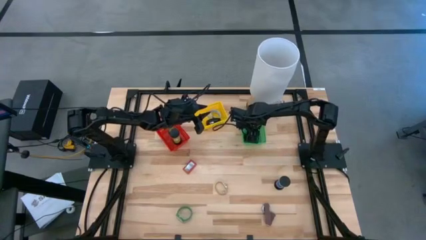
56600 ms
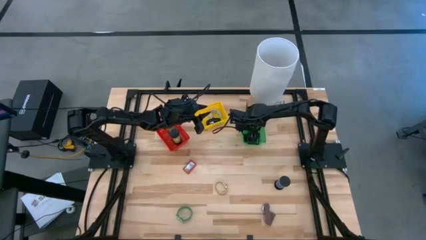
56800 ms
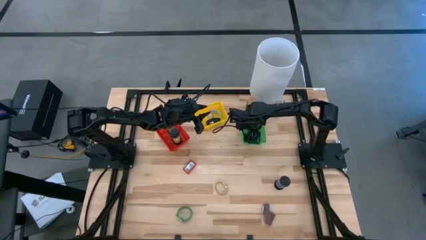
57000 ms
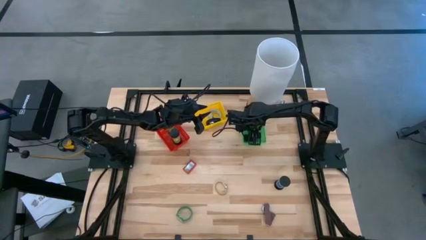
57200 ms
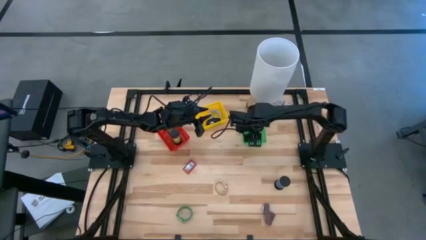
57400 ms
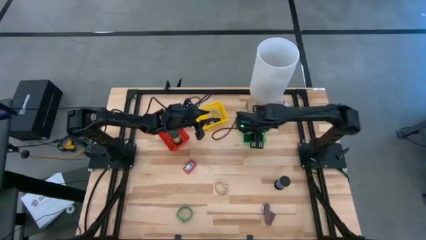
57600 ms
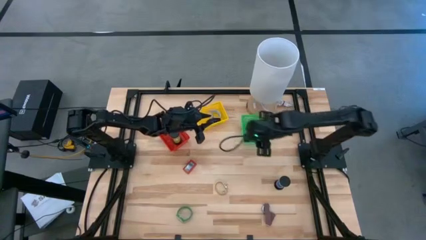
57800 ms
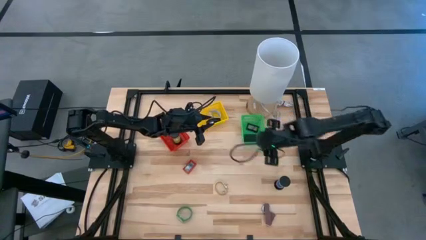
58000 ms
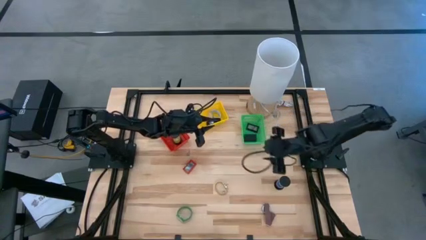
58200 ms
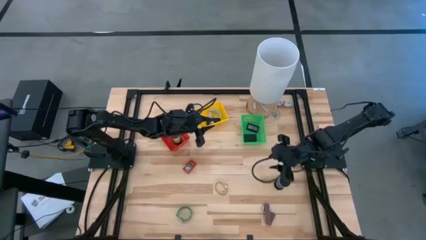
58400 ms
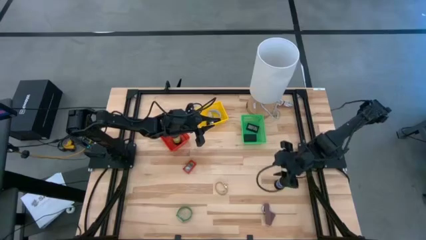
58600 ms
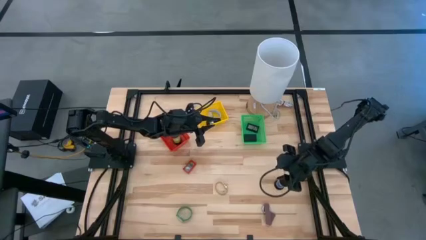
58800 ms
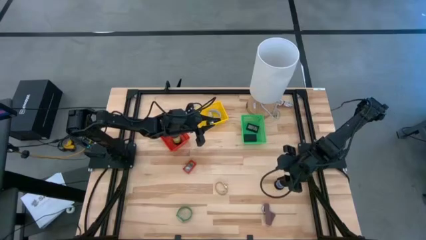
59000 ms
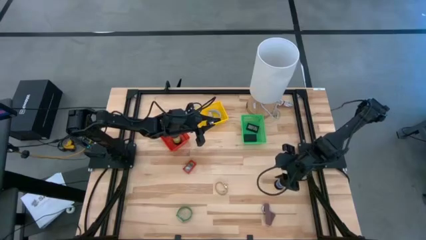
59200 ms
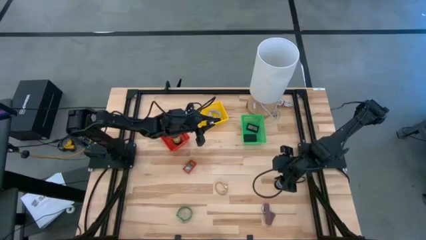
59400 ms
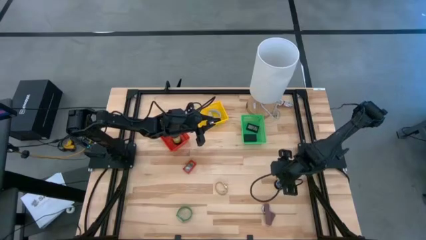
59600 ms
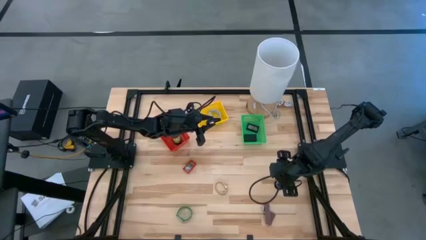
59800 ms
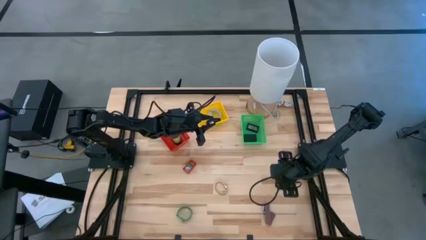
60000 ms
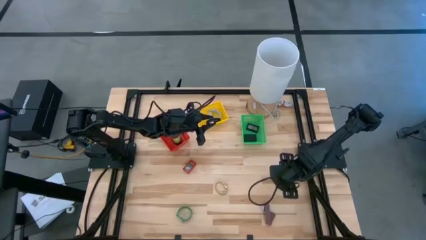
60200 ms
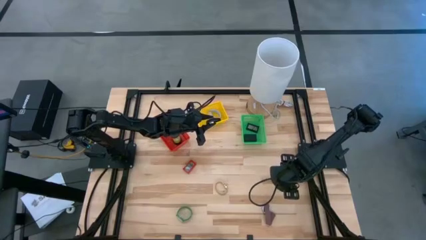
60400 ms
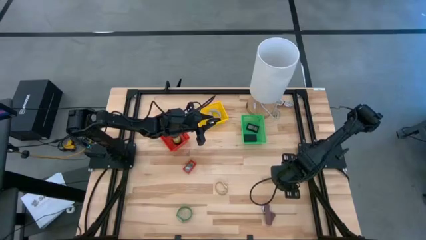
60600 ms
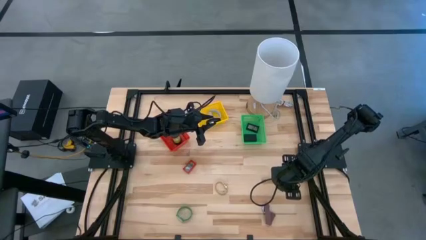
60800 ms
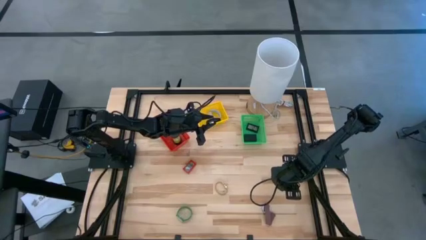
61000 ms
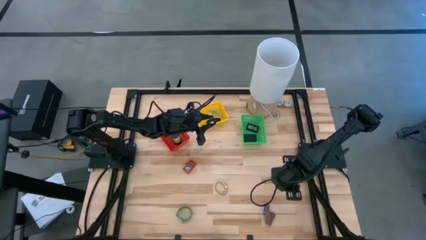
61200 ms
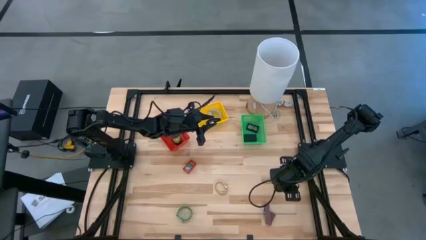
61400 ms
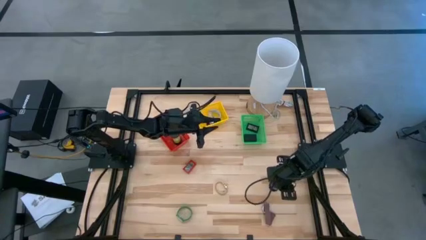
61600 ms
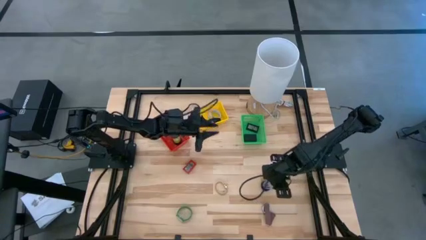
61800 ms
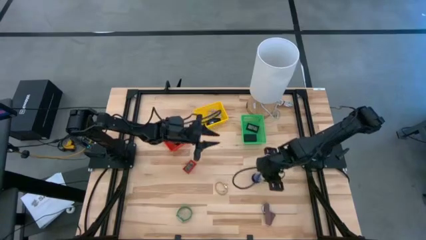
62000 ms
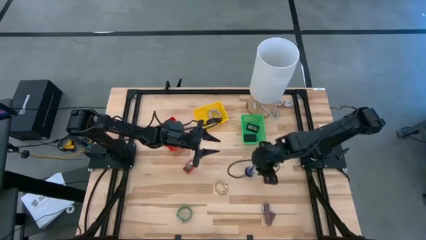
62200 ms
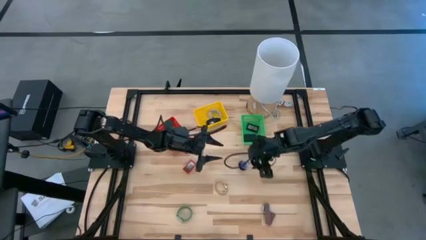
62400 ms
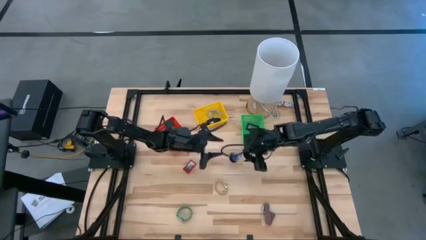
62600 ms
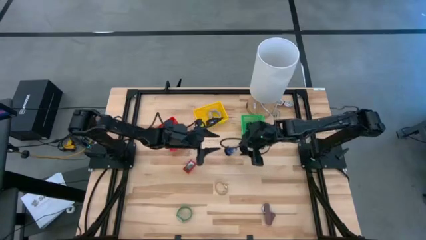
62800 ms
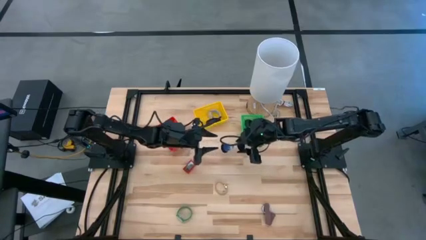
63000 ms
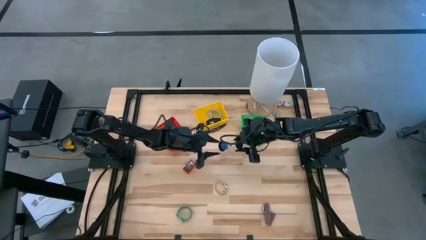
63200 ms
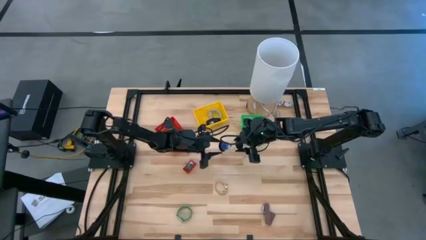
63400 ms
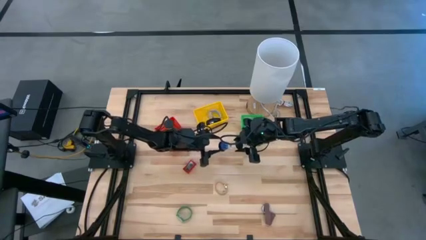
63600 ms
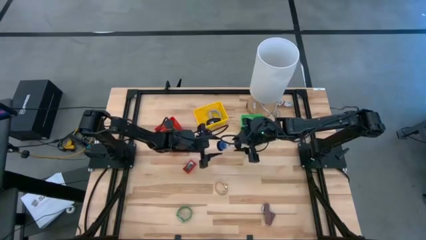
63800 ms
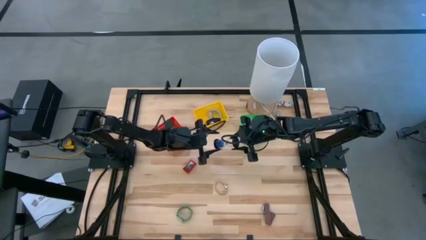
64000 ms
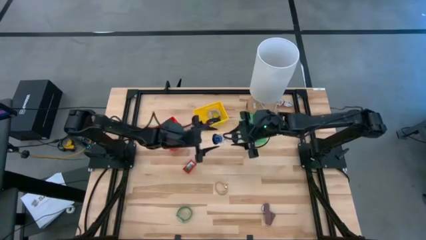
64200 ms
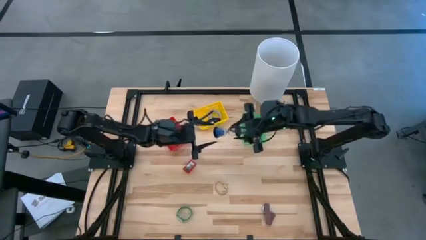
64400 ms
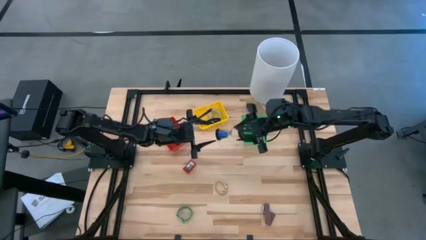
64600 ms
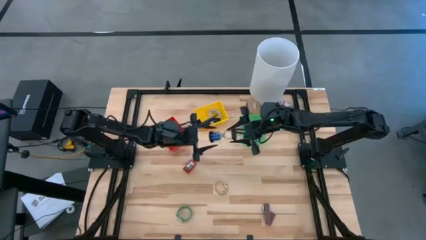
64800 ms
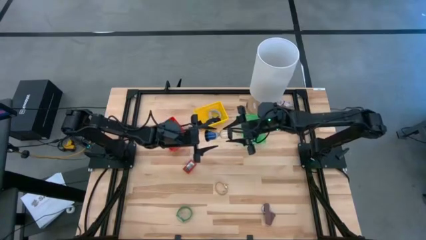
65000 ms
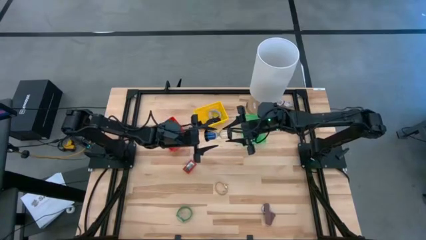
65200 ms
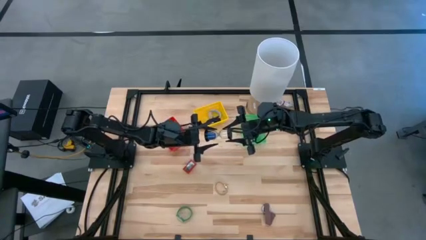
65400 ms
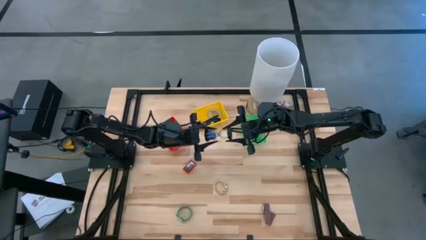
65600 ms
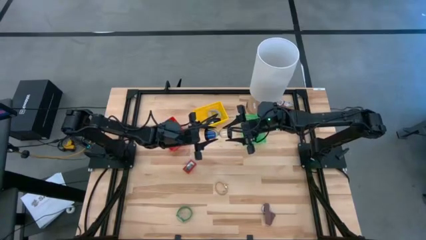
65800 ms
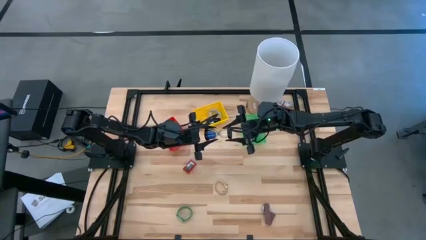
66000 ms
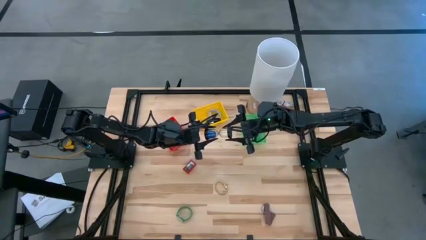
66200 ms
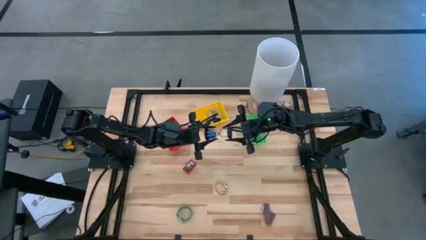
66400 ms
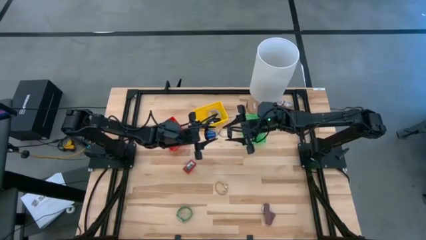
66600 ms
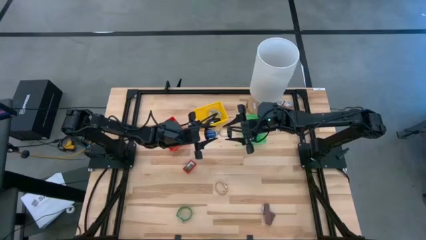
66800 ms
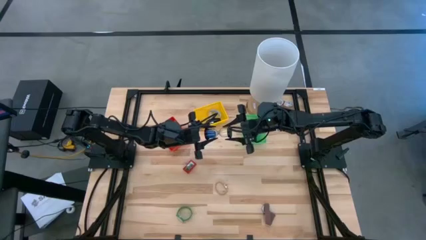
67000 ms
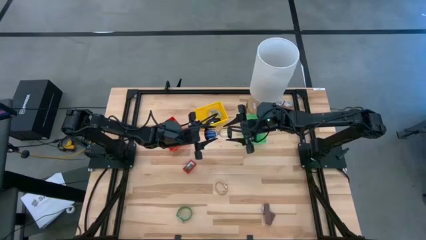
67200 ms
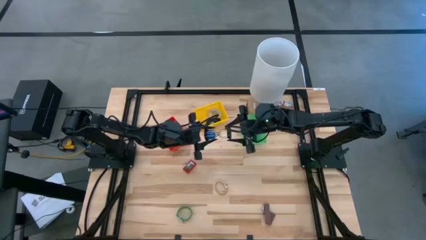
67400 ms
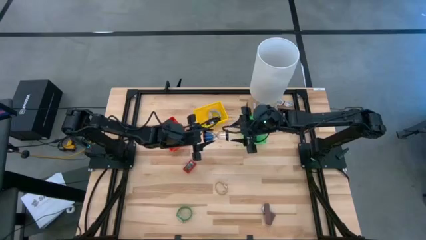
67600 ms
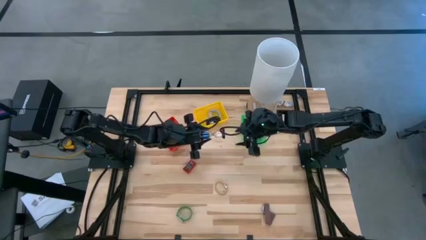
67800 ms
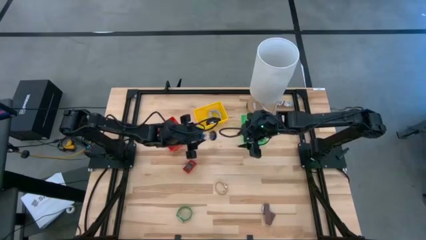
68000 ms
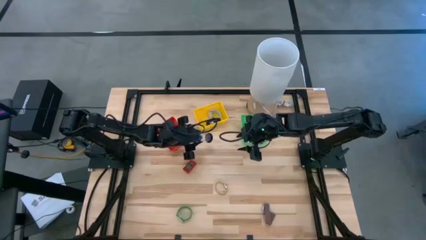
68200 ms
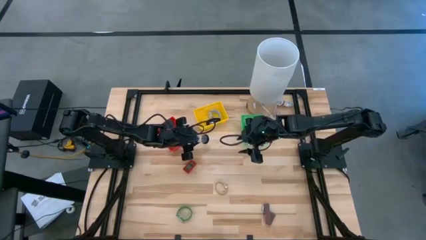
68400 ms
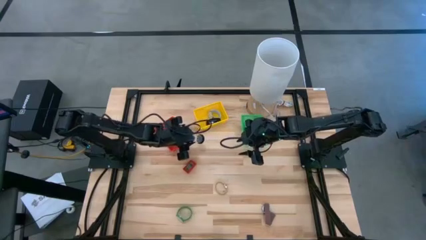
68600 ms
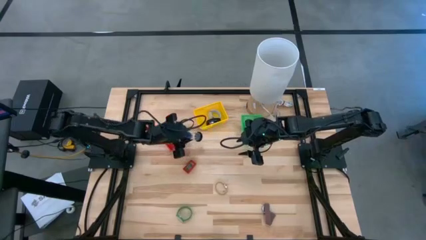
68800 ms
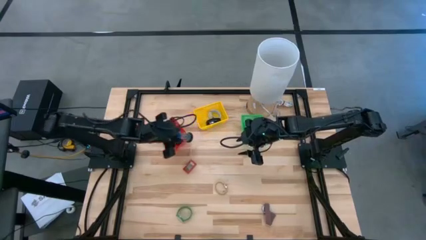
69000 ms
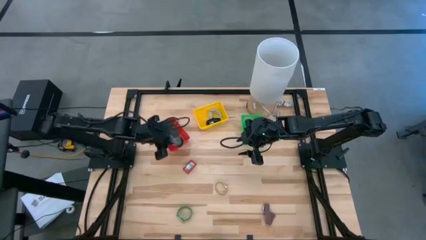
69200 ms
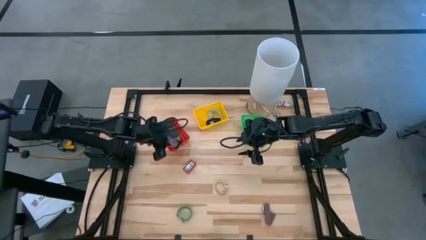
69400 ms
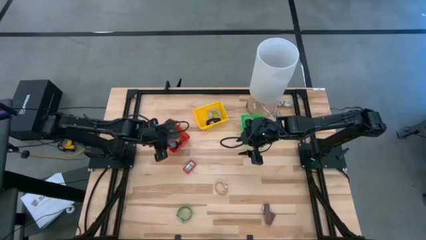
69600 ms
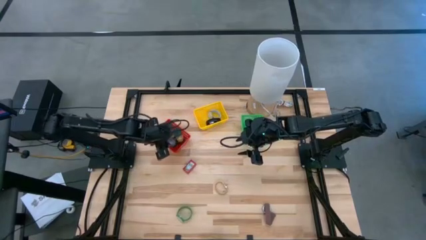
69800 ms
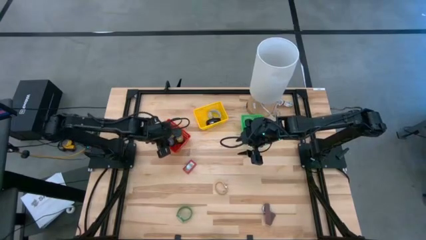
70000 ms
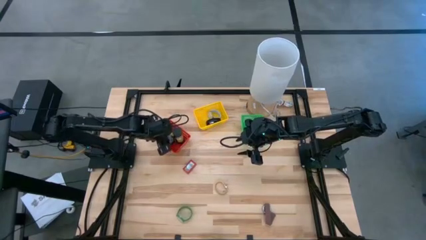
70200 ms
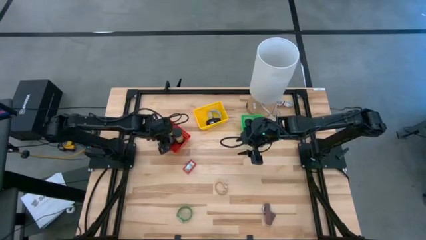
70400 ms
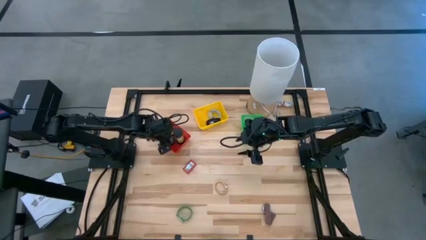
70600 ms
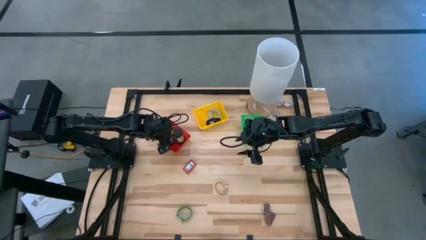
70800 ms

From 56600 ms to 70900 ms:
Task: Pick & Place Office items
Put the blue hourglass into the red basket

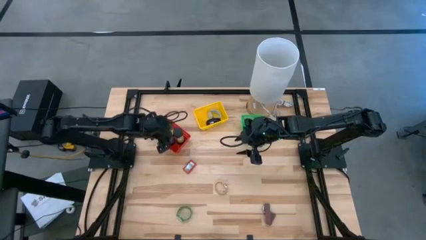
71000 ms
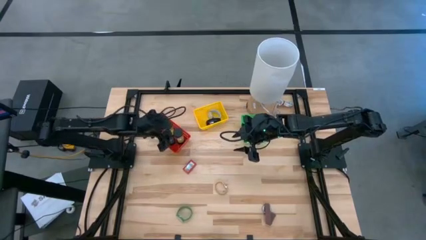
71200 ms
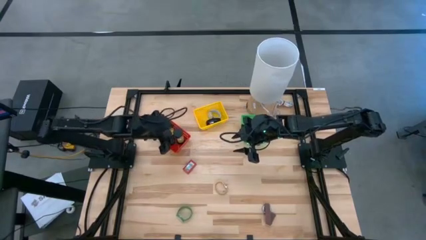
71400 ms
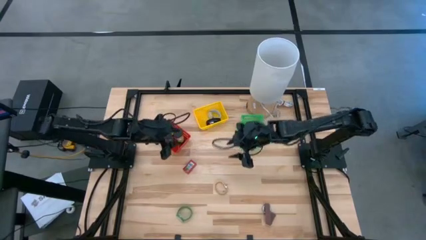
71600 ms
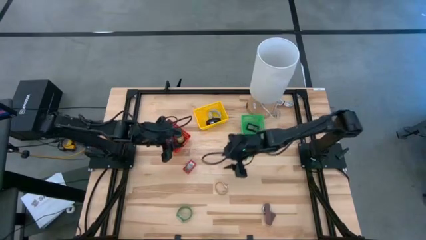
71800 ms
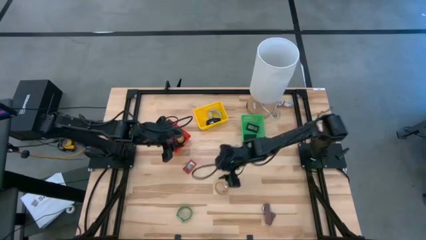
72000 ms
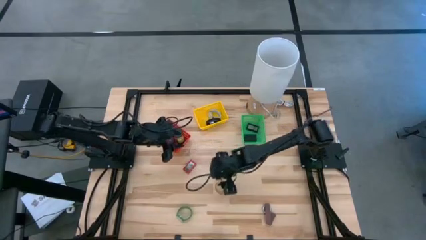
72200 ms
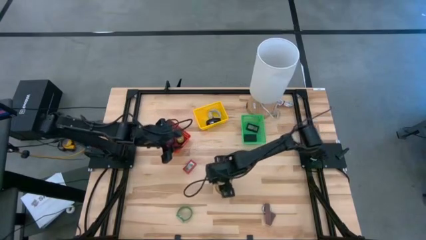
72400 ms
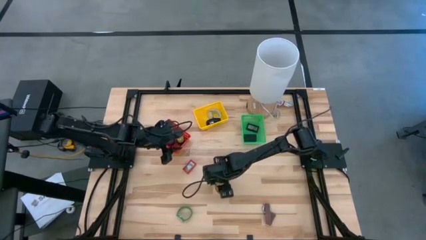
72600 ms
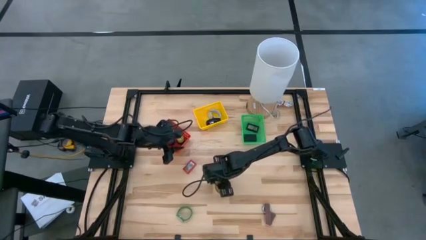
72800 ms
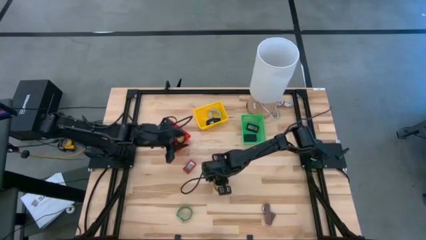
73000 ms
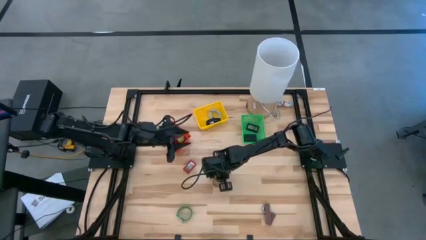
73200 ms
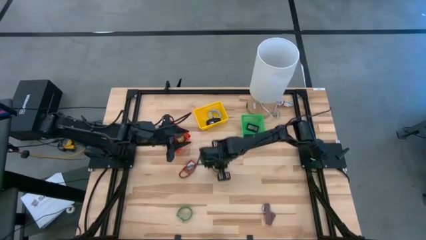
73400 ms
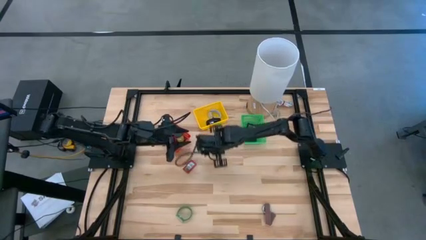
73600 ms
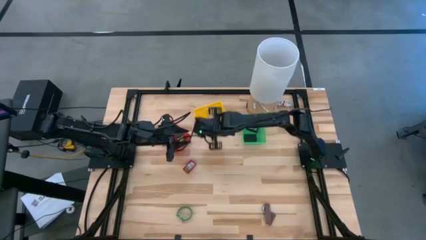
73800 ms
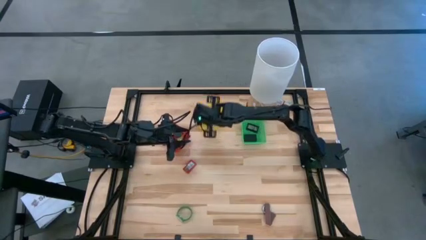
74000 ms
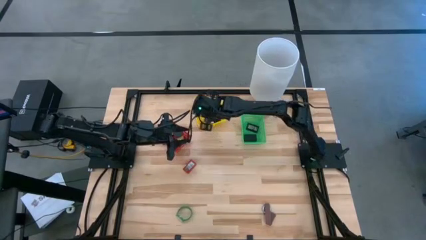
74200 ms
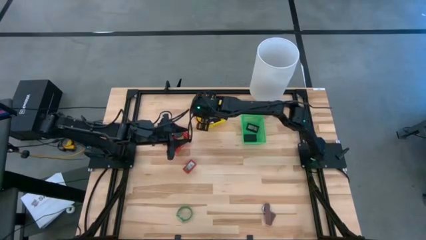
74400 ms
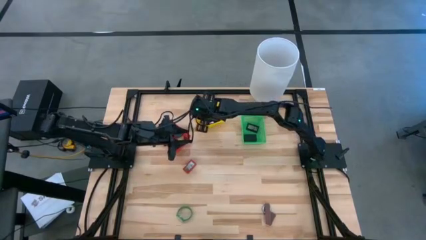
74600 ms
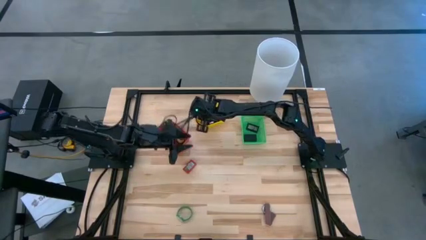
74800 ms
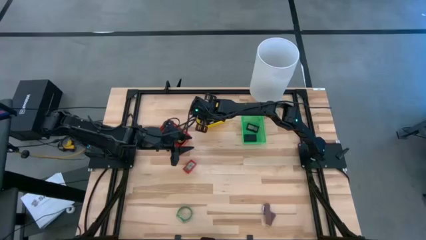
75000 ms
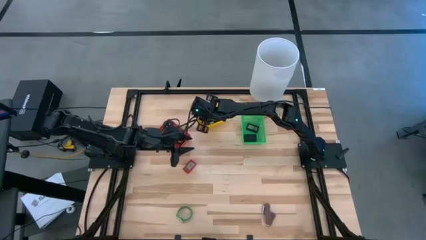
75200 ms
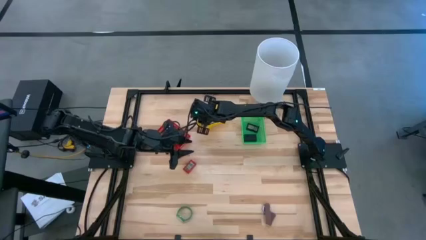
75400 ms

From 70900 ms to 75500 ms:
Put the gold watch into the yellow basket
